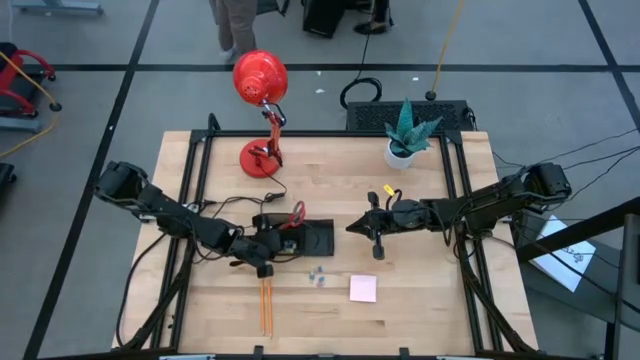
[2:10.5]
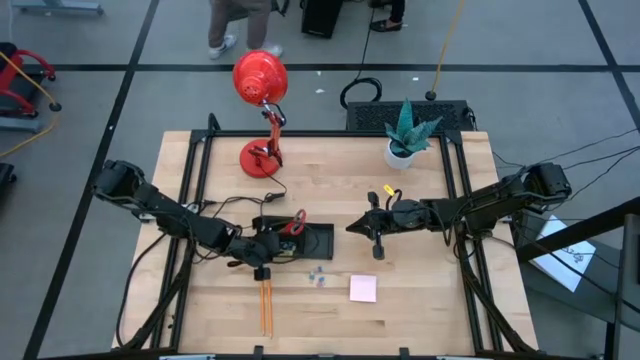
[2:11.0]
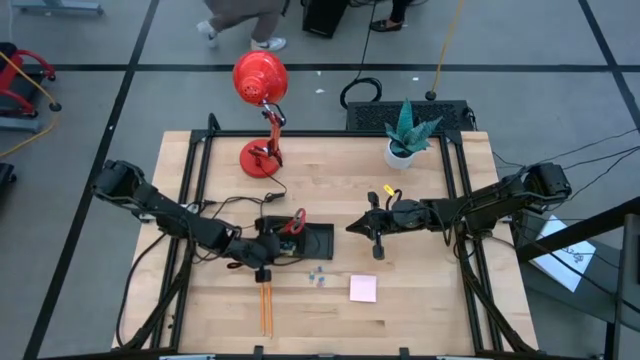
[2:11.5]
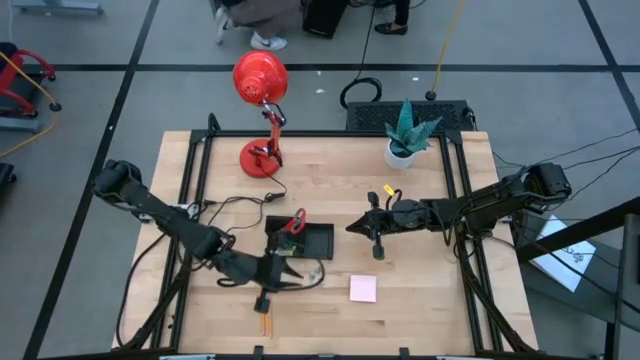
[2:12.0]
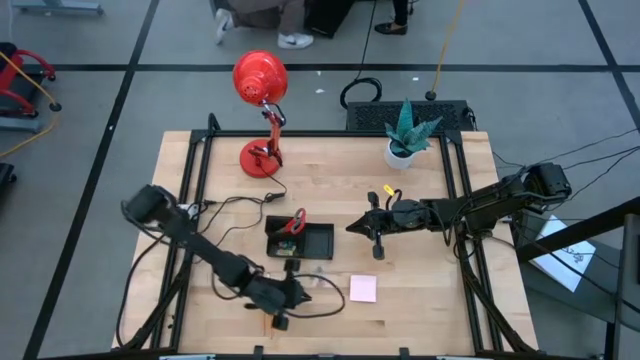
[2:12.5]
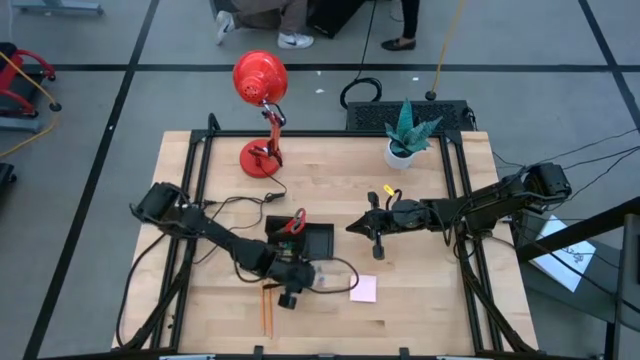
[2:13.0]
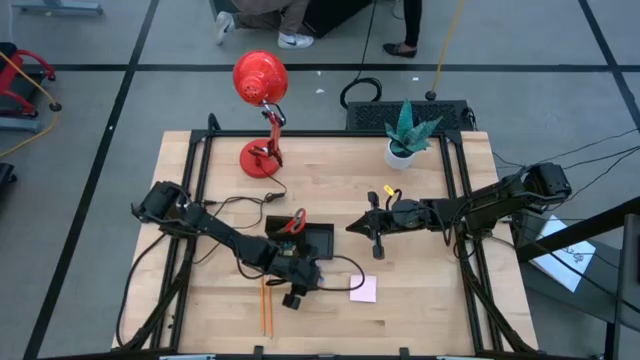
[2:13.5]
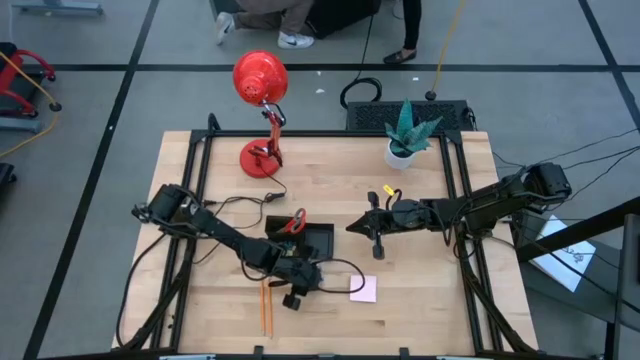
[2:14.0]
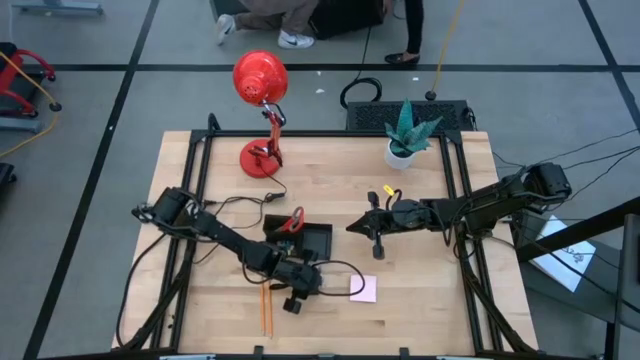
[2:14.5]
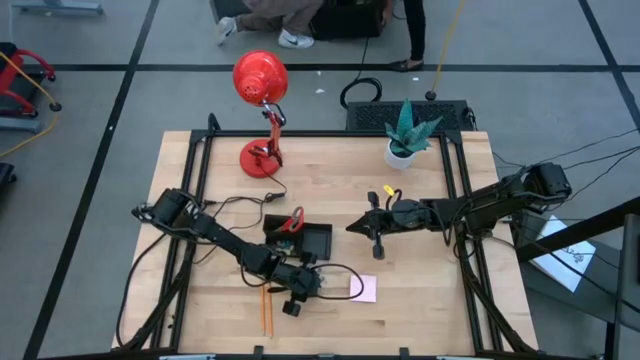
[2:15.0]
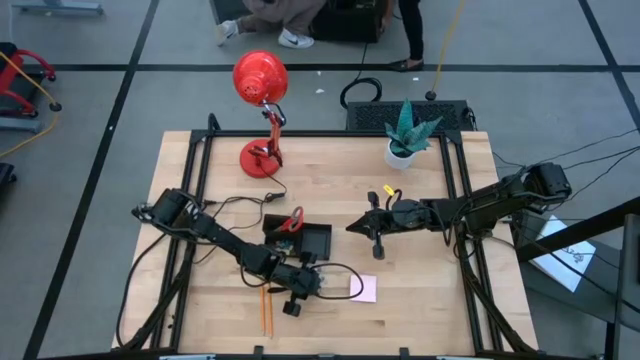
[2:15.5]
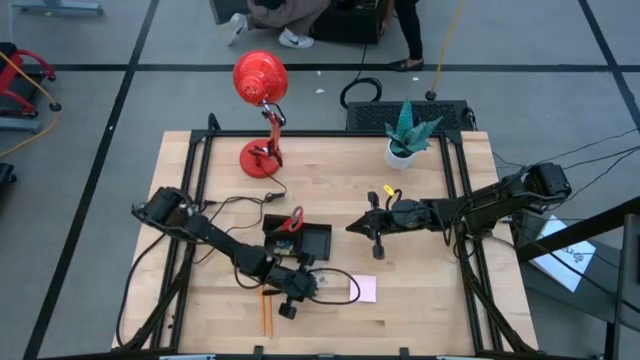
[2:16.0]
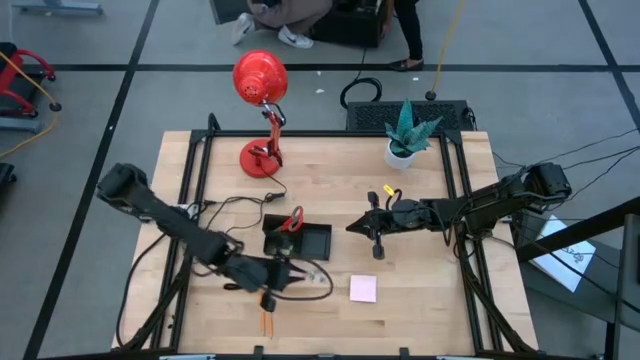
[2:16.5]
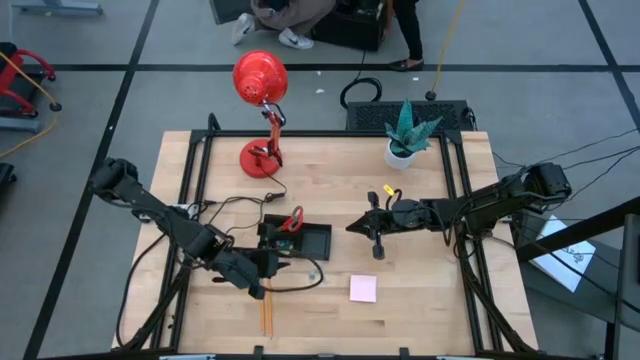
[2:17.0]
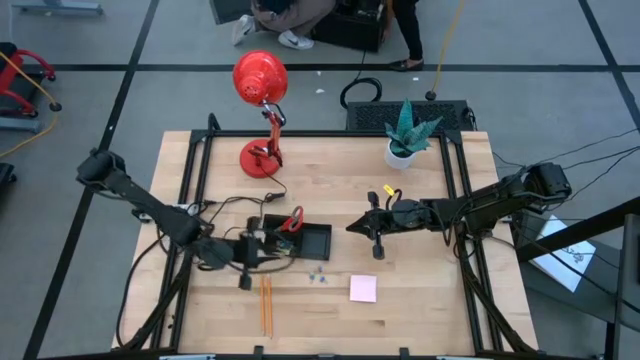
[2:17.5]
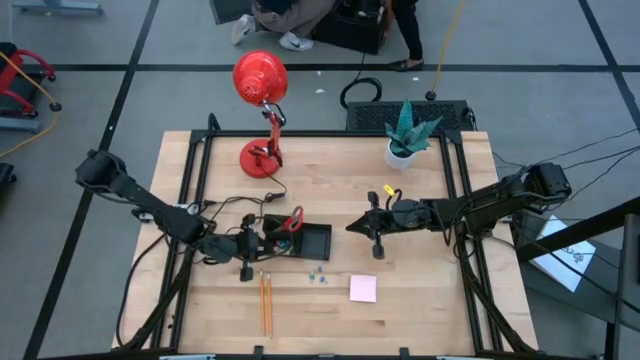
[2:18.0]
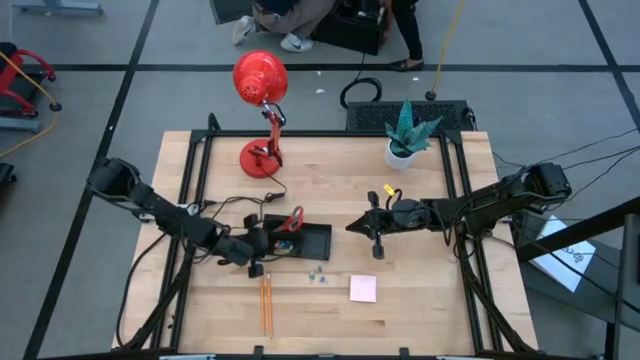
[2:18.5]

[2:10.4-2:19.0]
Task: Pick and place office supplies into organizer
Put the pink binder clip into the desk organizer

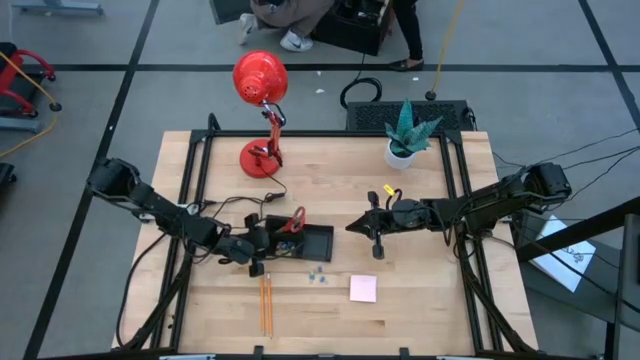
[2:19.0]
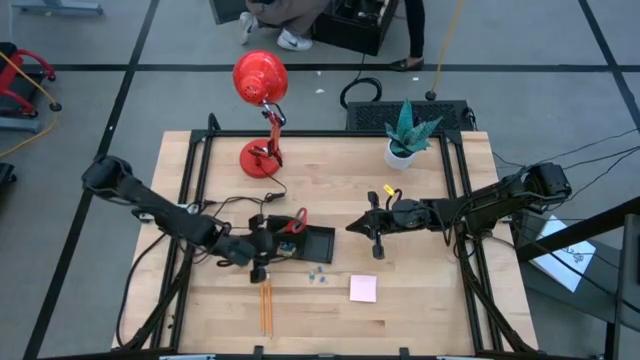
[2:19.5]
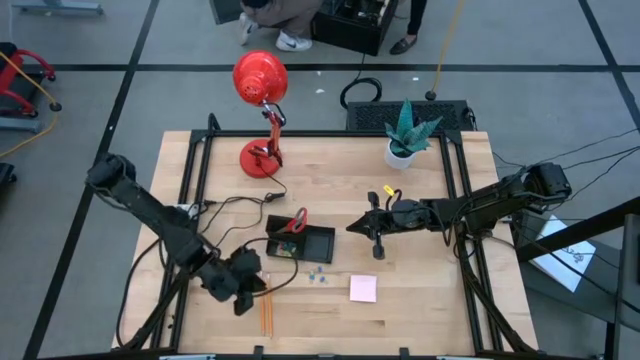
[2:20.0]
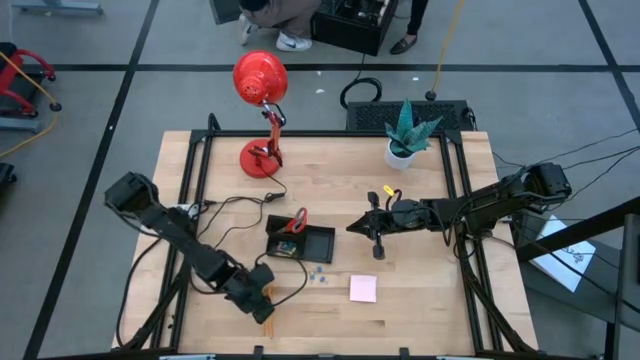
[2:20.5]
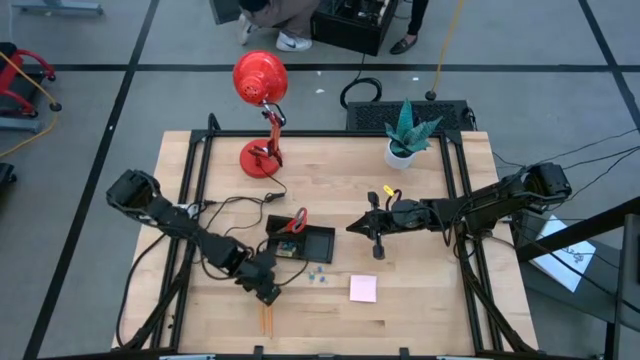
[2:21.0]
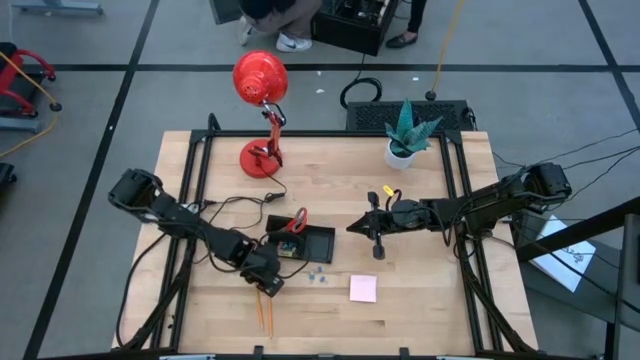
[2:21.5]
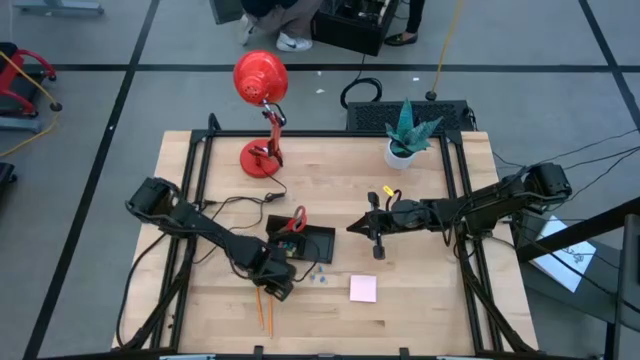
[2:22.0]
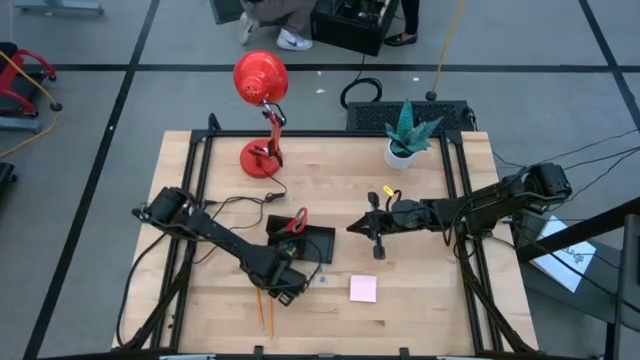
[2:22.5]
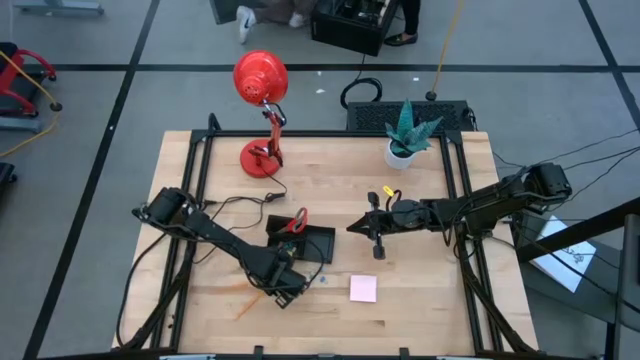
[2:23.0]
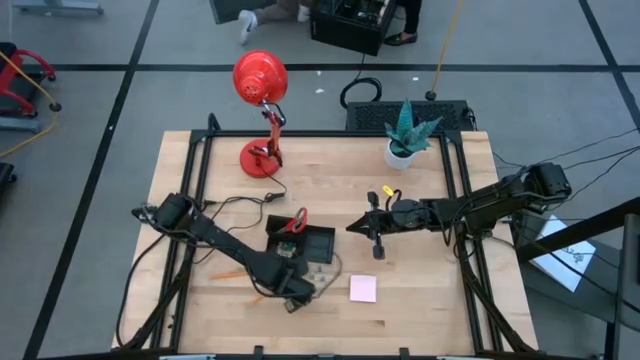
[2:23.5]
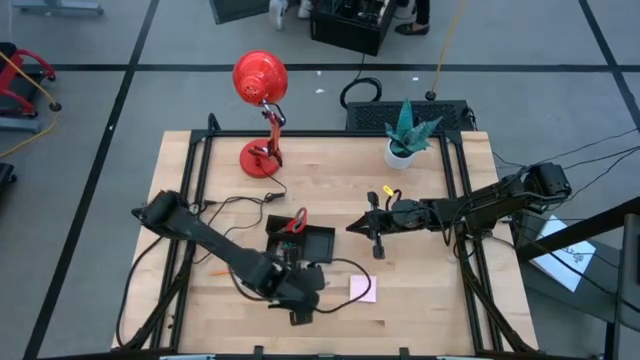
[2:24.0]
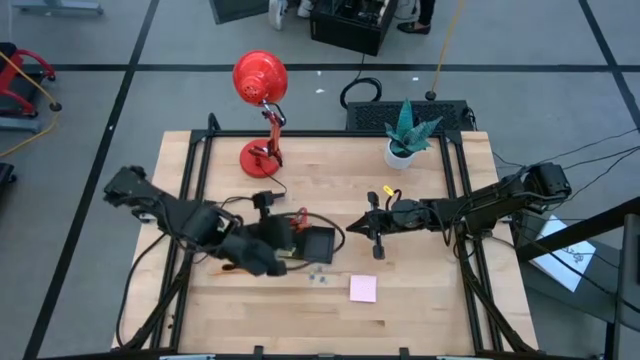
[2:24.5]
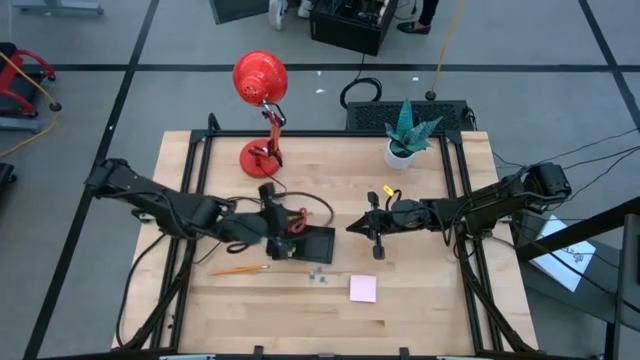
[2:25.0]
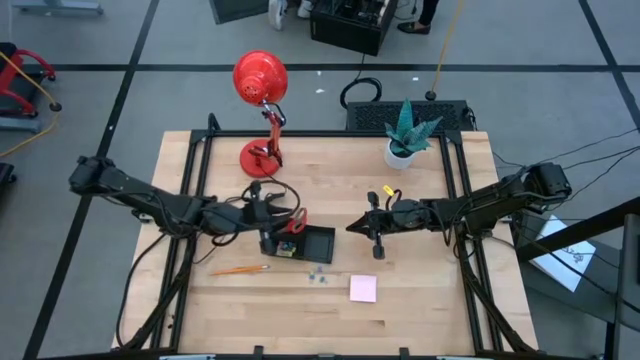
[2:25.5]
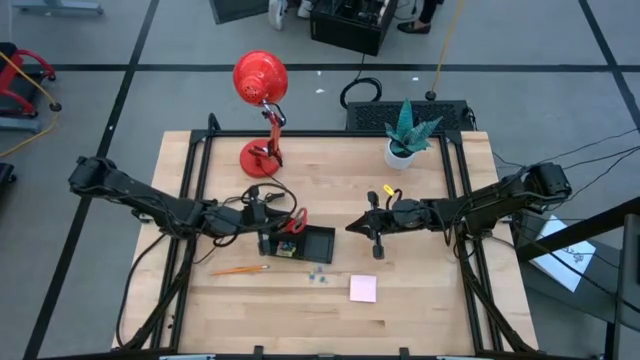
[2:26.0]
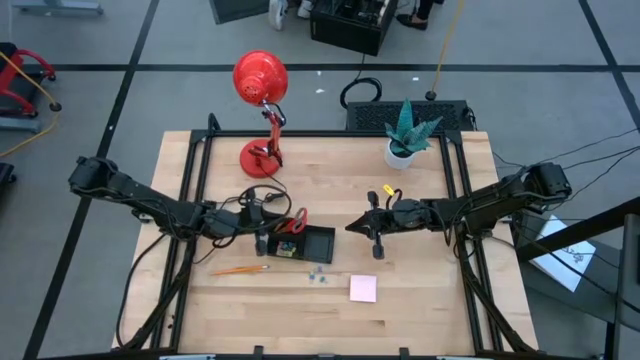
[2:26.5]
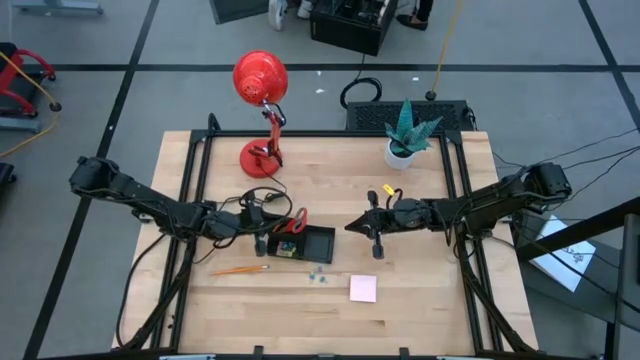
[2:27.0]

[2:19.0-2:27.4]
Put the orange pencil into the desk organizer

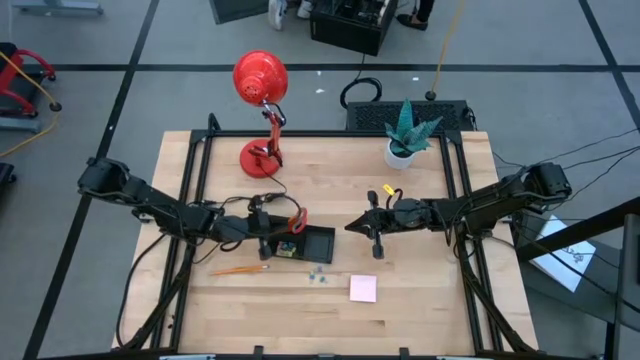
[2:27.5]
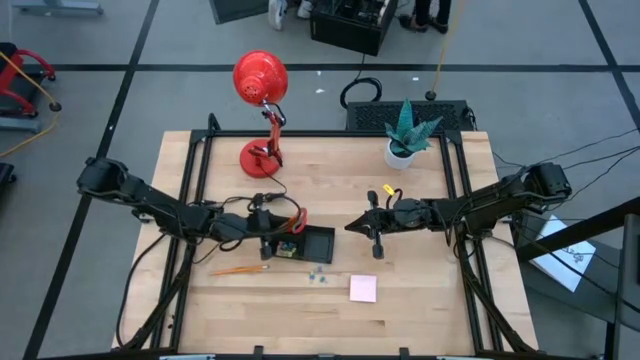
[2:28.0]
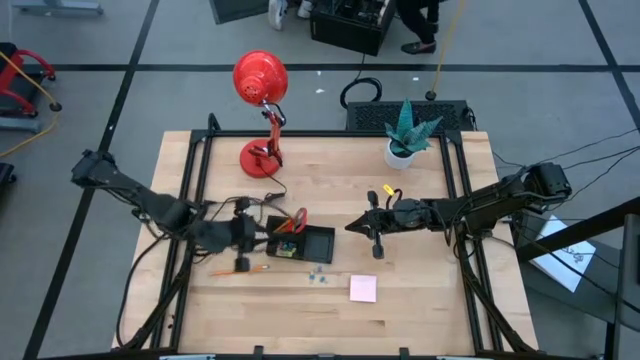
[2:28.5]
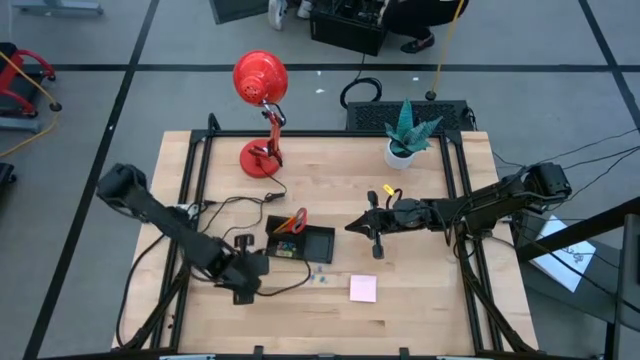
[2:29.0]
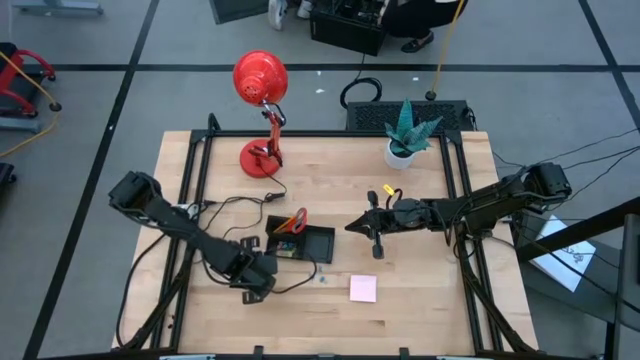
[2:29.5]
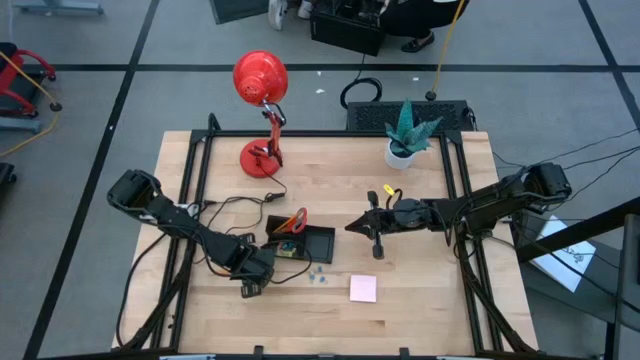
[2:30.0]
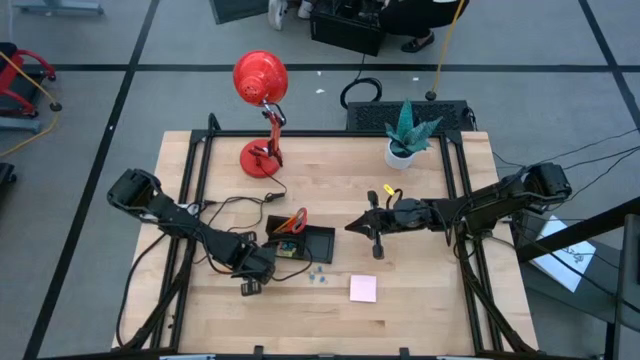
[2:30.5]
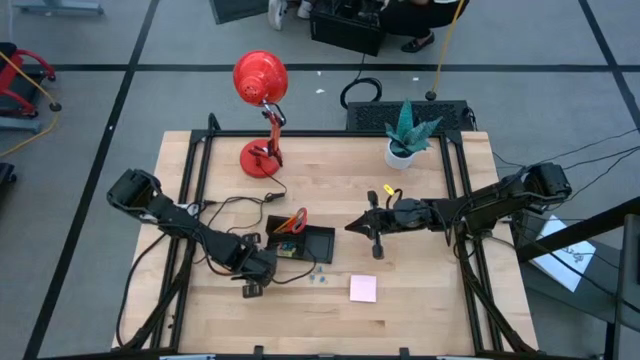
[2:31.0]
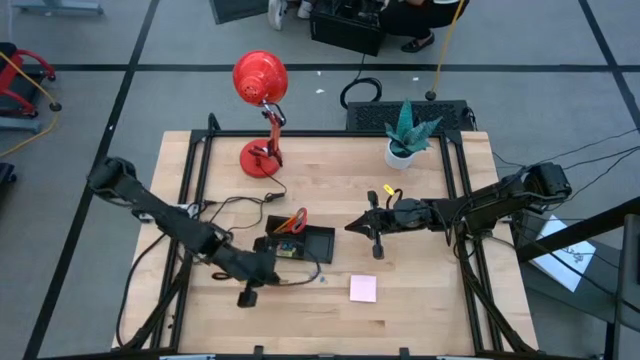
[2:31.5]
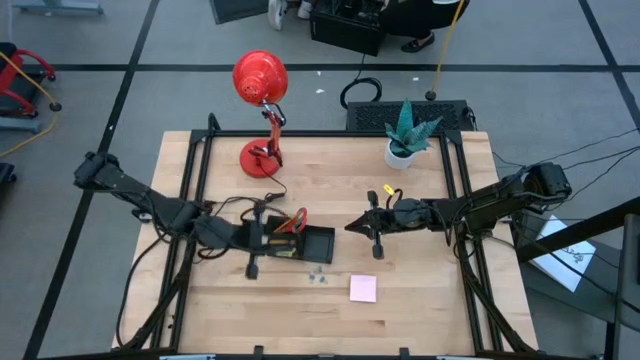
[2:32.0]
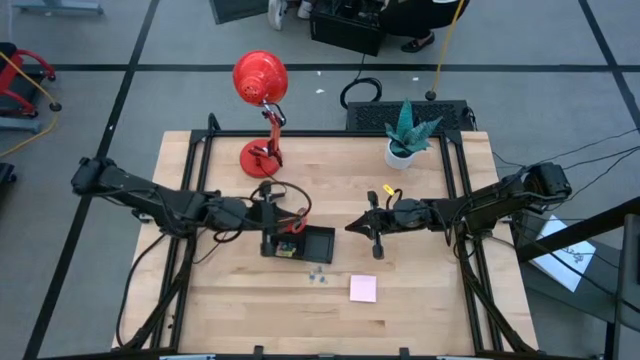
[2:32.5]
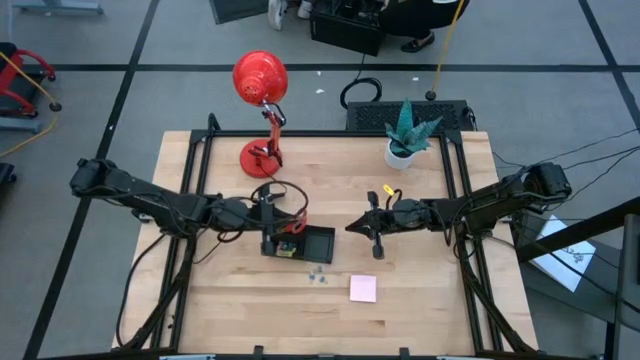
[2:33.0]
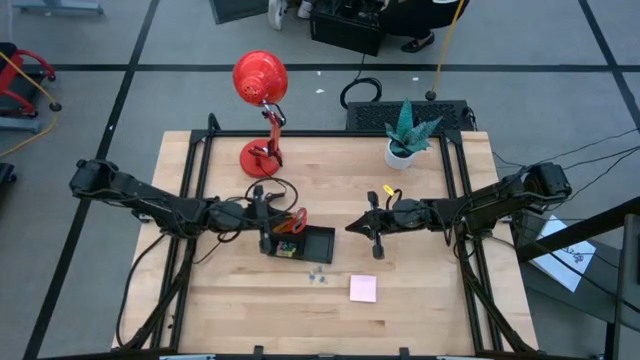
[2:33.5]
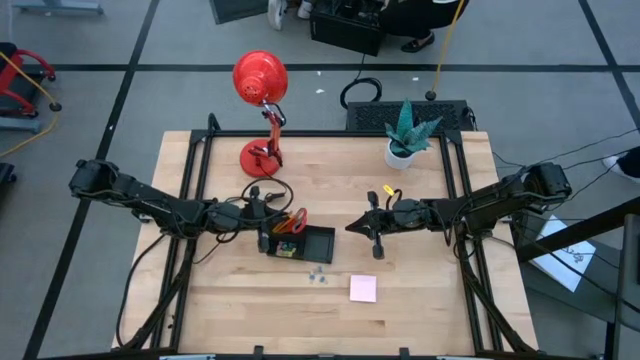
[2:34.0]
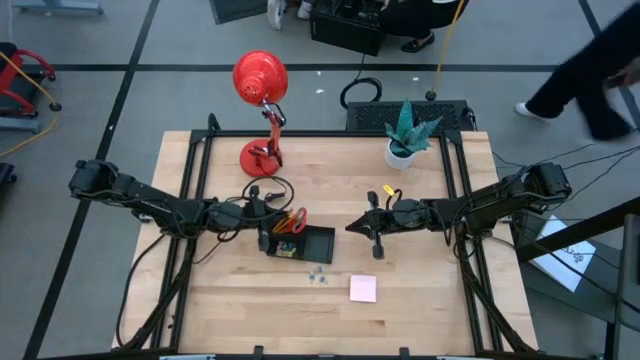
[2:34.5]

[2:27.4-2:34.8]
Put the orange pencil into the desk organizer
